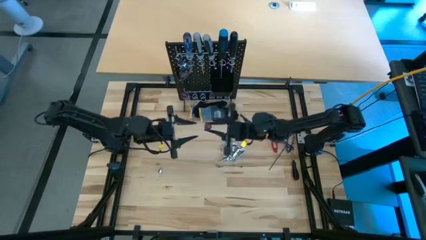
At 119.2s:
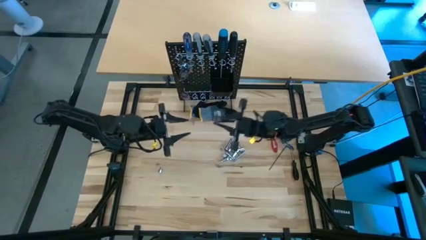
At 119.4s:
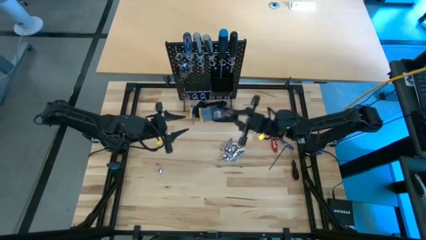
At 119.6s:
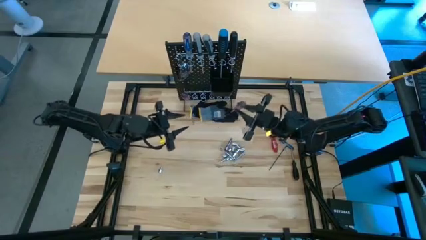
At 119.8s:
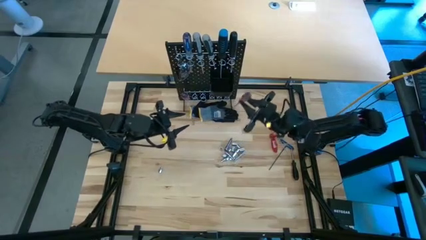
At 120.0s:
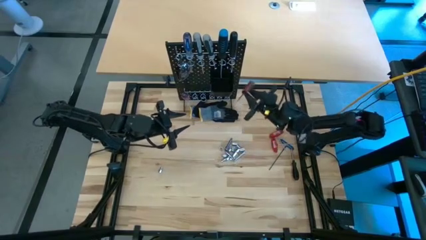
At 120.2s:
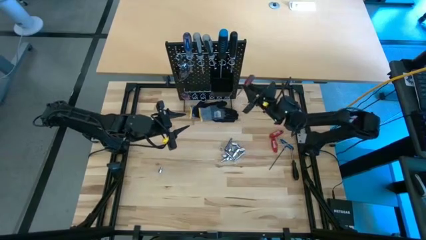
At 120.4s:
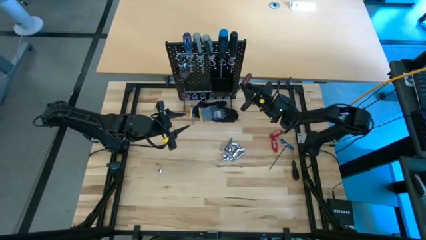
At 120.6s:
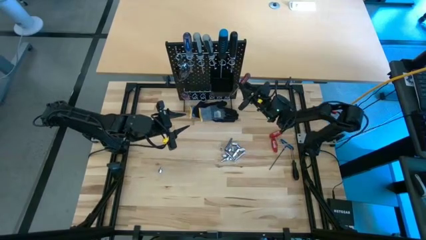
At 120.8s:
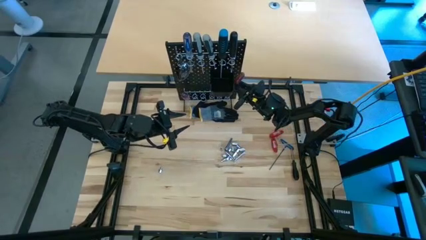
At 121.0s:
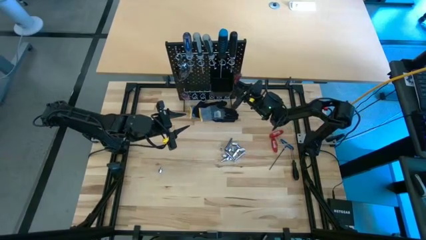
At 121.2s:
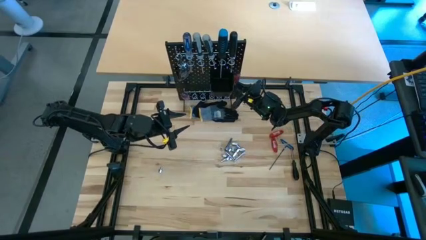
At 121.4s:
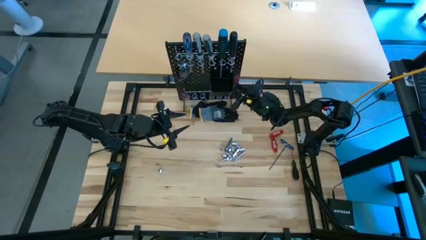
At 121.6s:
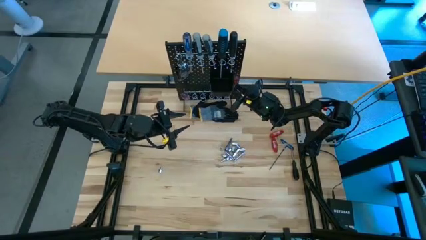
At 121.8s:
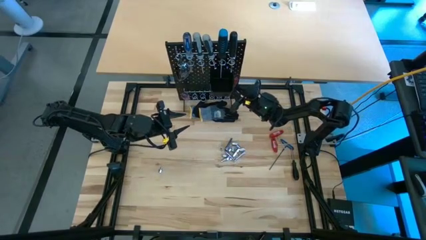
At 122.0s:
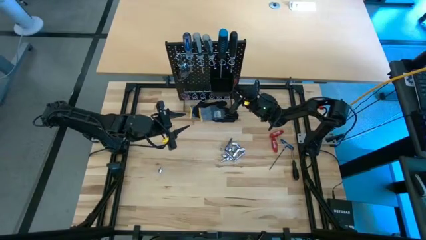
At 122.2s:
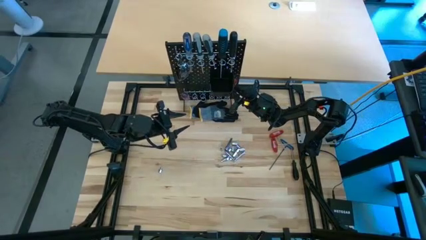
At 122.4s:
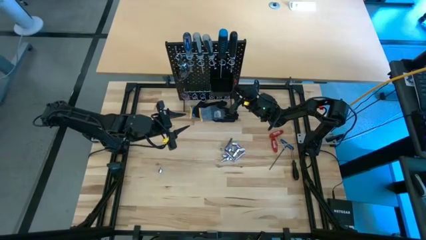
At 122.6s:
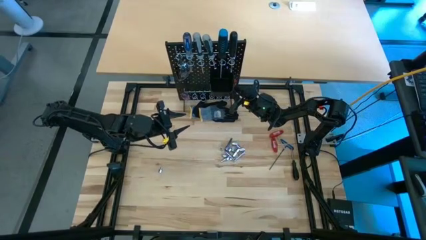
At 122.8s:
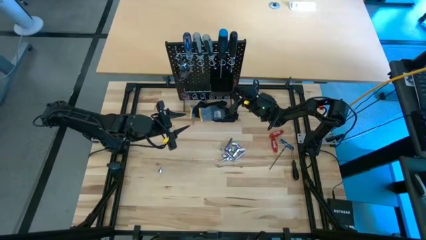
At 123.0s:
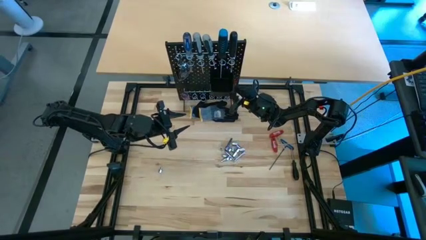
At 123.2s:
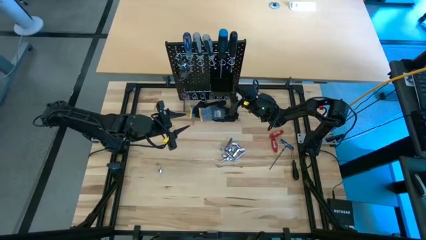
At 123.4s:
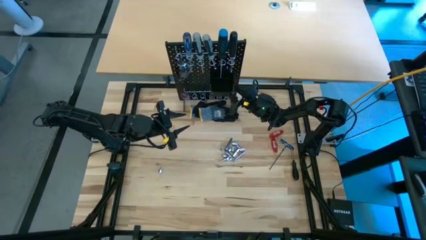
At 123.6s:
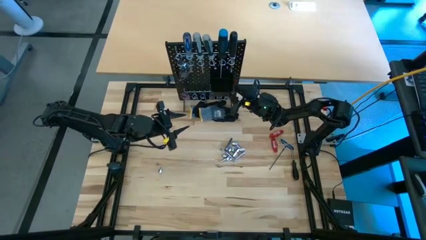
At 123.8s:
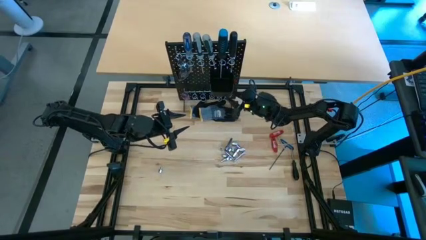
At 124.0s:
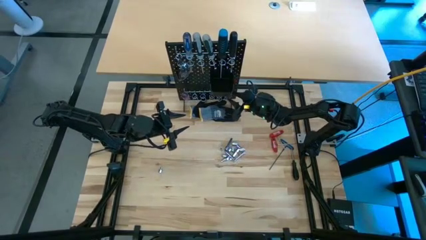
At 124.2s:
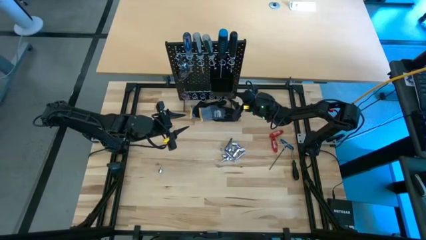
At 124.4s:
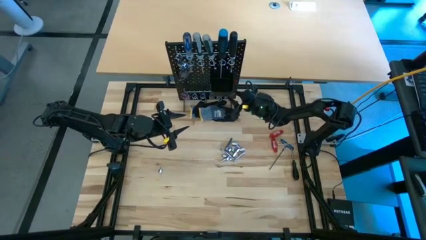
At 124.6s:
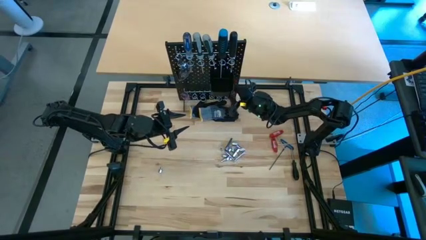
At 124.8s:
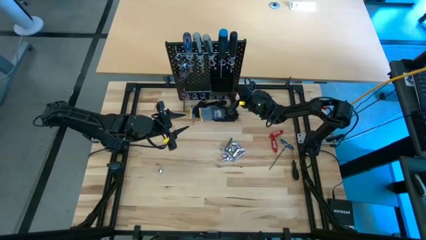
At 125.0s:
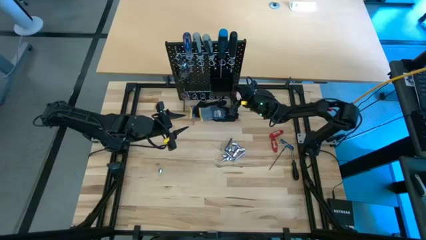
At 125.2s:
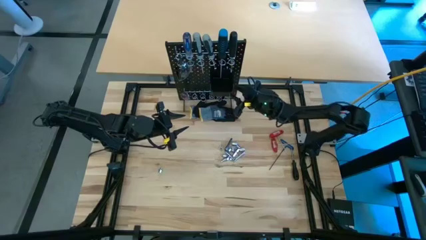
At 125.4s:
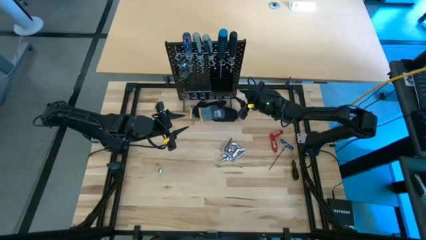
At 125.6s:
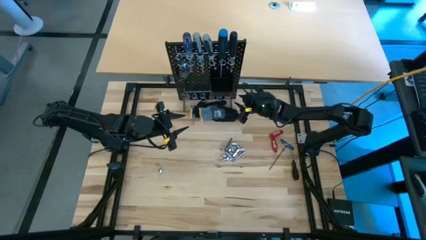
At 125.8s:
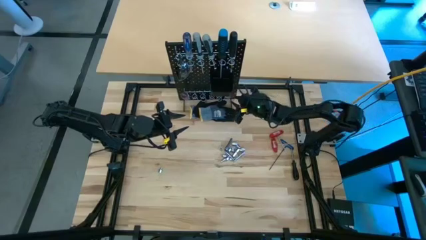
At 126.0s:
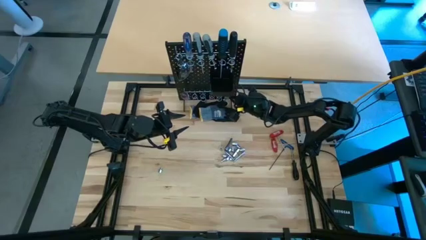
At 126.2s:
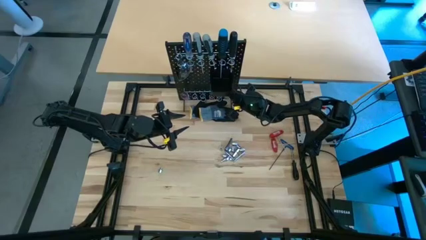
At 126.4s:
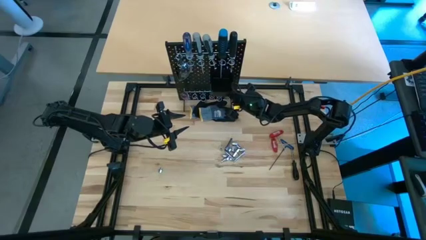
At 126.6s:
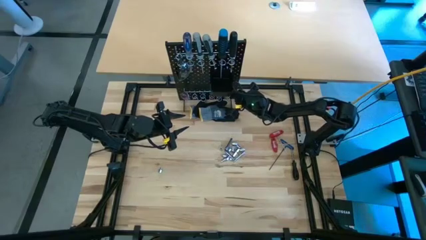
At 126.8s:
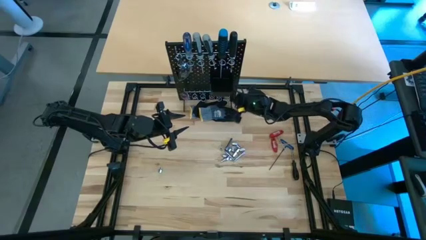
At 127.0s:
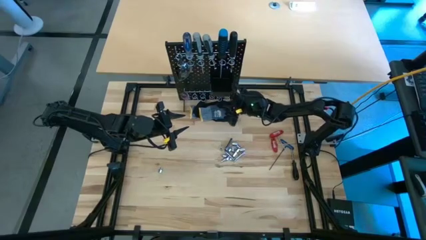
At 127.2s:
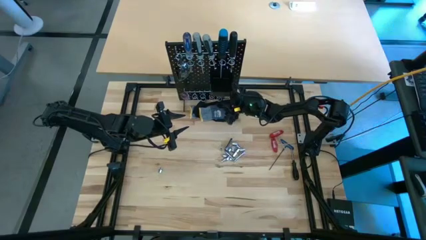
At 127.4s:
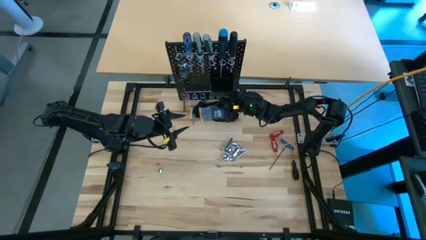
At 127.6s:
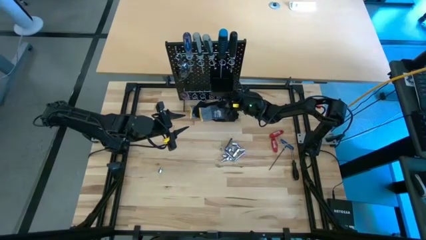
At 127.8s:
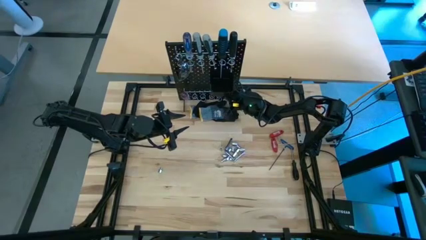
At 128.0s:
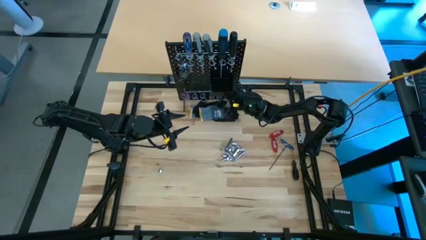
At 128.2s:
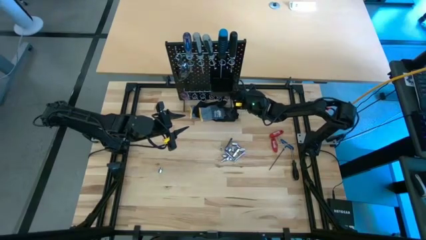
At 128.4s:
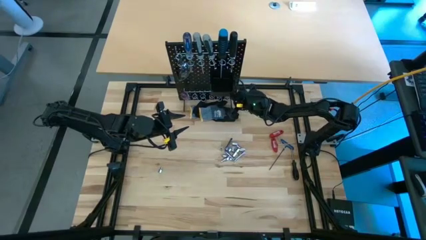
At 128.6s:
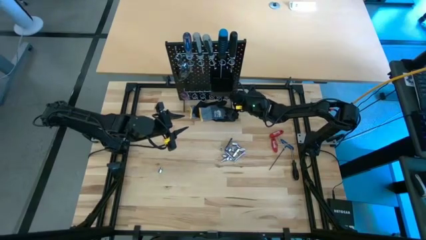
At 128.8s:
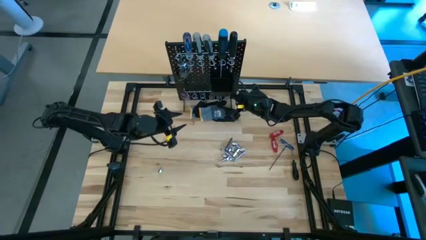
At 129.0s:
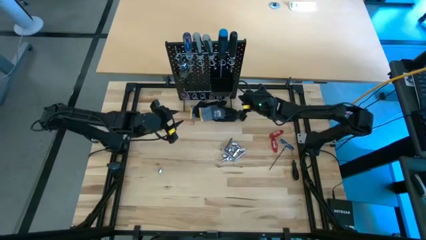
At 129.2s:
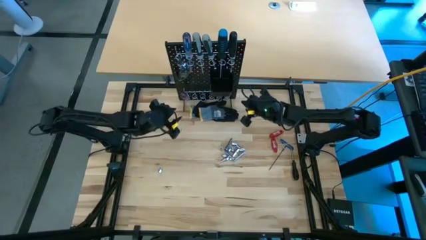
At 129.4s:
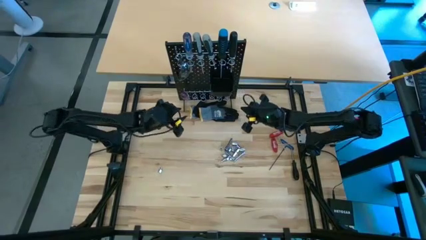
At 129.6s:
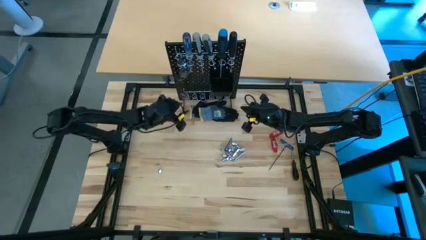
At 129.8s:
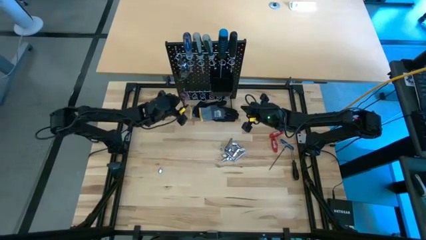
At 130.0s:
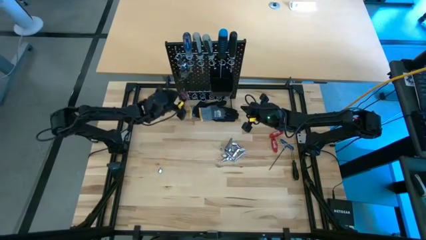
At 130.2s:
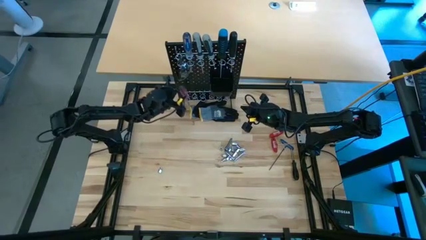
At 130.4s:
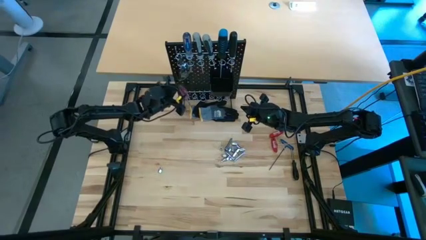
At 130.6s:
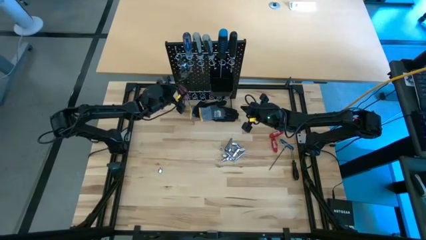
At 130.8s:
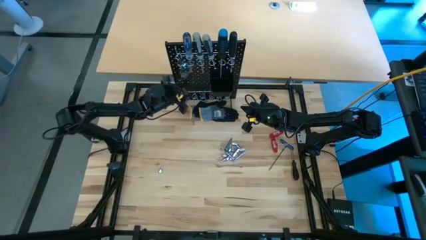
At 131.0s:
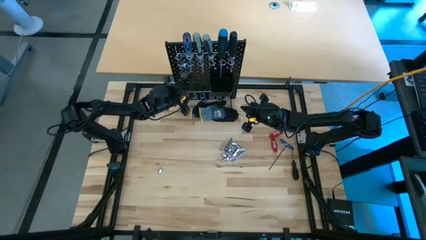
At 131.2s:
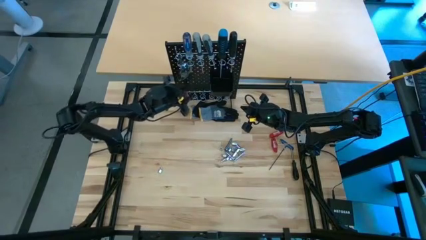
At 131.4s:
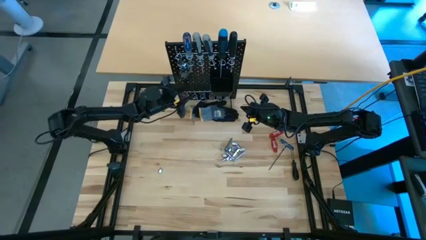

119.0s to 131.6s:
Task: Hang tools onto peg board
Hang the red screwdriver on the pegboard

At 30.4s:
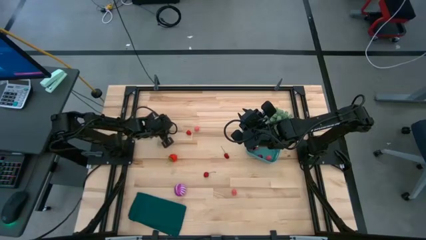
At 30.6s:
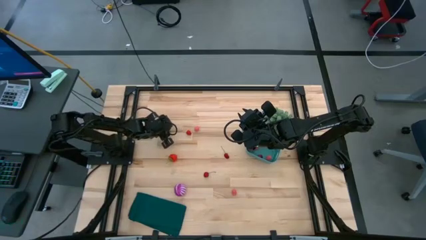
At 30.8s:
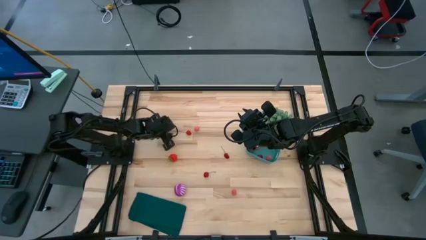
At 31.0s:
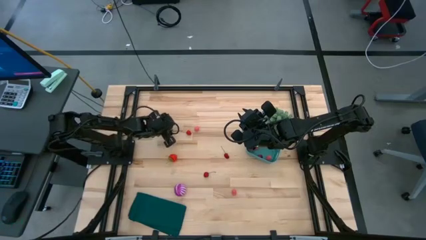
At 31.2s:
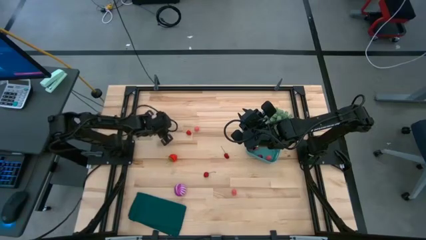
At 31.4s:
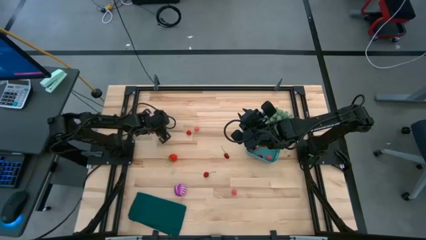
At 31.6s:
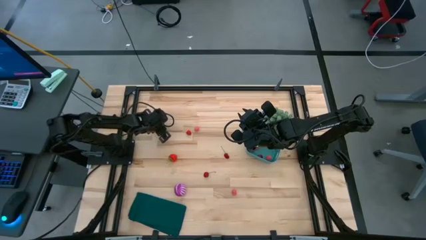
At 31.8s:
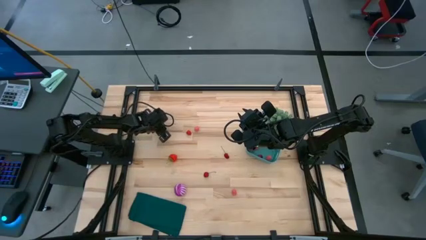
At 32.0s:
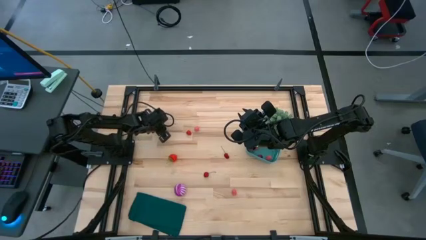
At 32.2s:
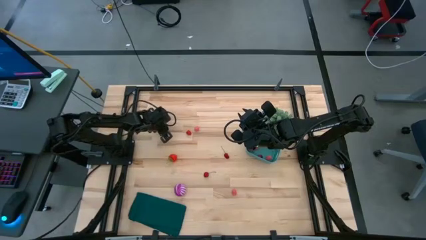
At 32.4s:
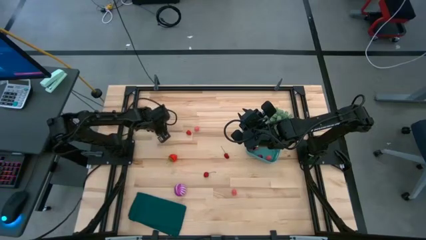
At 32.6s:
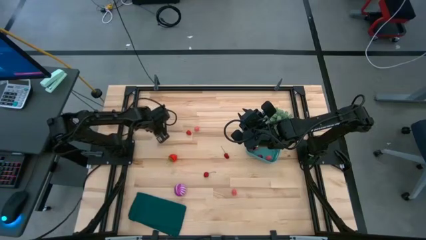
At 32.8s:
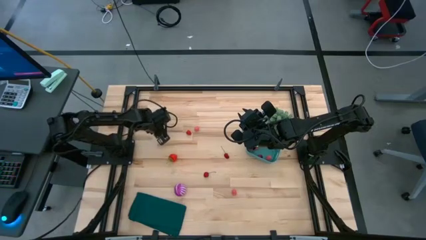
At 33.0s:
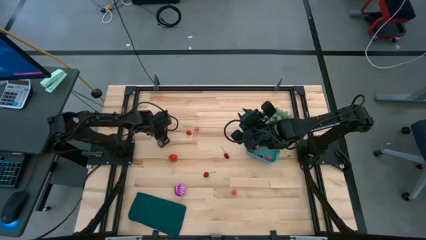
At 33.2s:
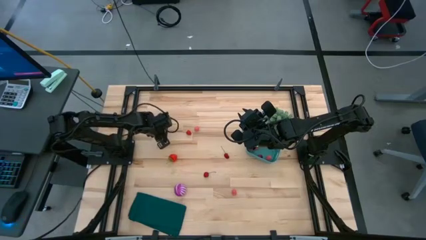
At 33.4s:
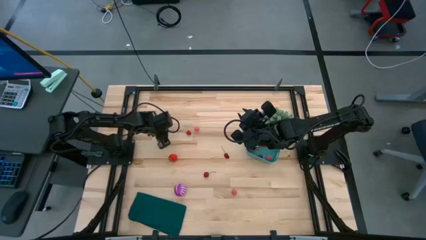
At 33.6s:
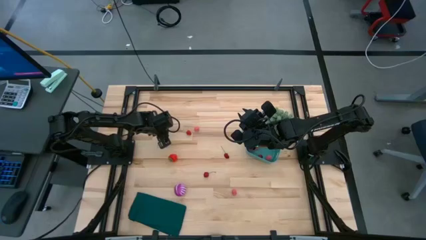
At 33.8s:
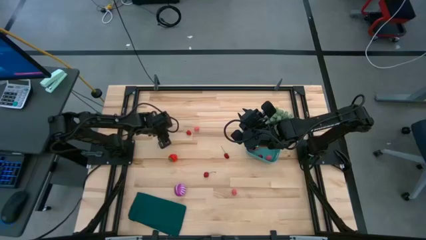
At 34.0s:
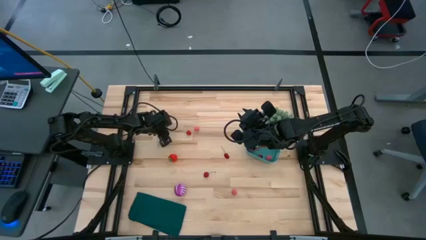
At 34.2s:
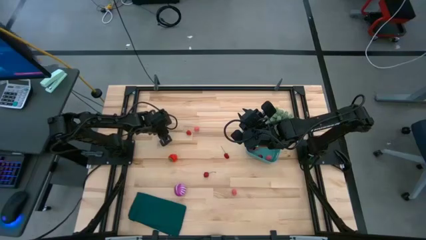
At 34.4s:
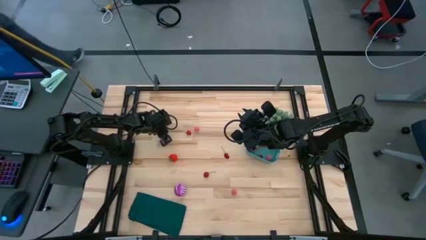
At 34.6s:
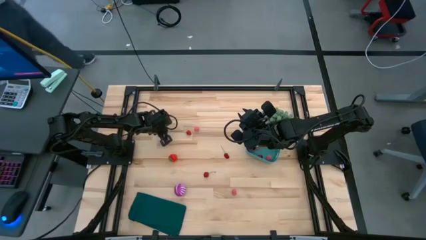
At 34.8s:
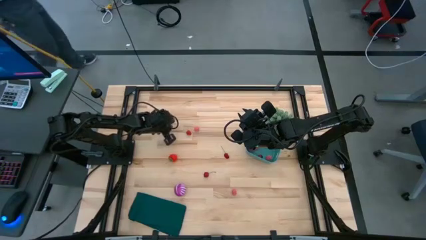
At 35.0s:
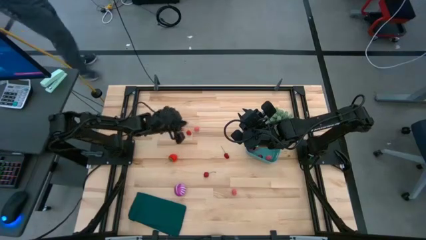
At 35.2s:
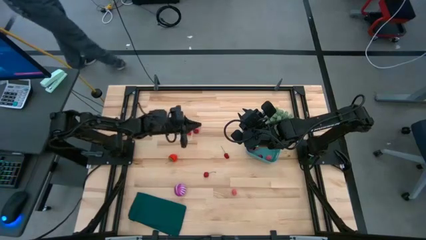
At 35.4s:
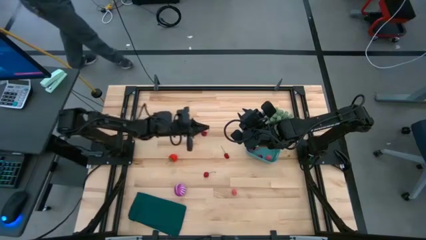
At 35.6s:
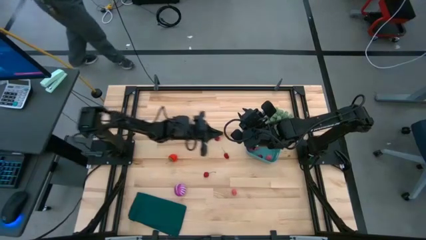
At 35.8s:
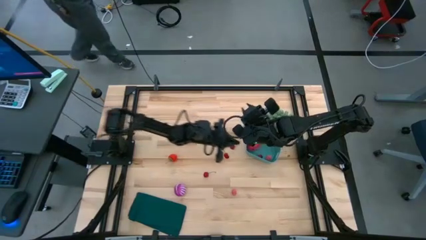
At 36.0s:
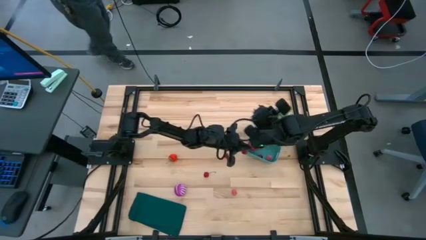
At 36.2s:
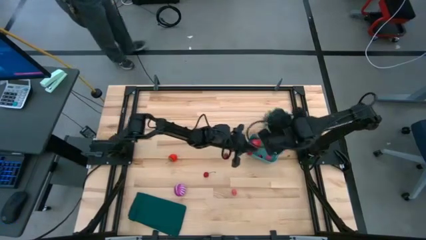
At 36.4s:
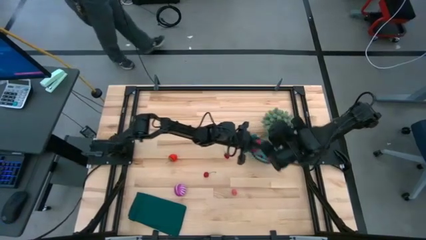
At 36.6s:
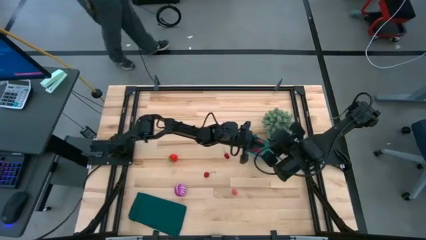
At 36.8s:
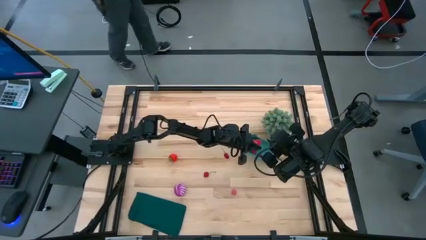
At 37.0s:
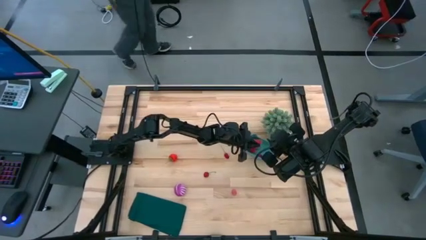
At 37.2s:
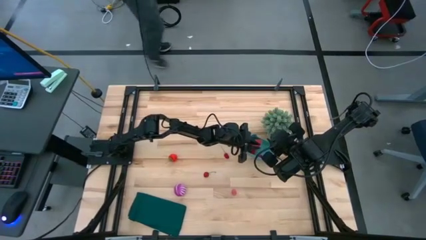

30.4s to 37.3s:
Task: Pick and placing Produce into tupperware
Put the cherry into the green bin
